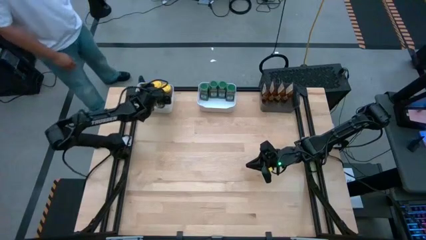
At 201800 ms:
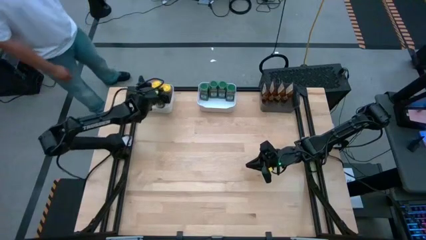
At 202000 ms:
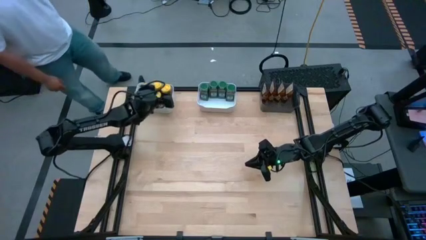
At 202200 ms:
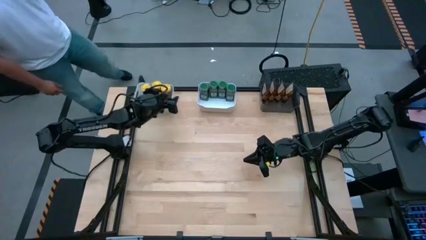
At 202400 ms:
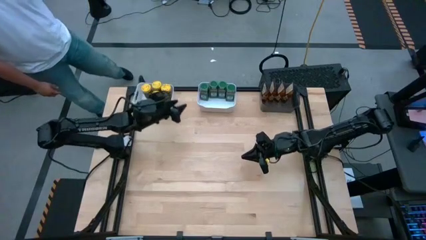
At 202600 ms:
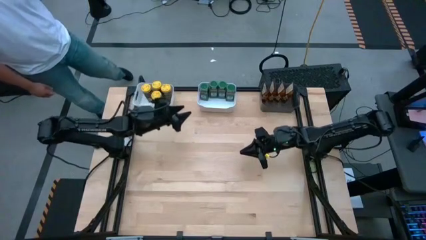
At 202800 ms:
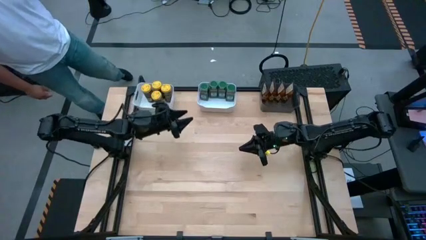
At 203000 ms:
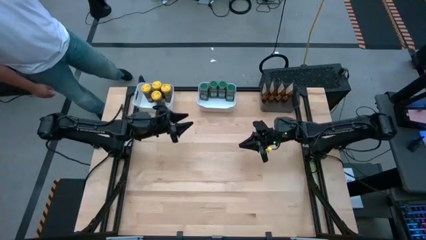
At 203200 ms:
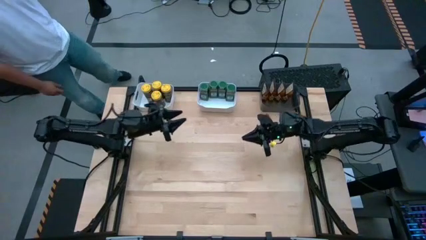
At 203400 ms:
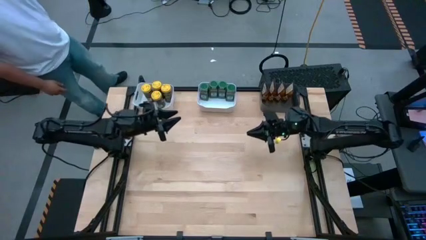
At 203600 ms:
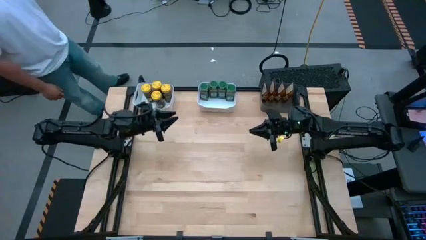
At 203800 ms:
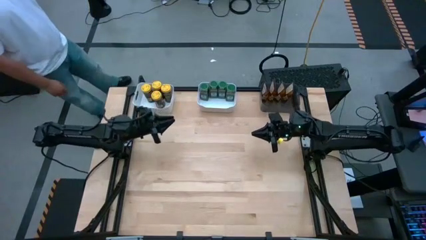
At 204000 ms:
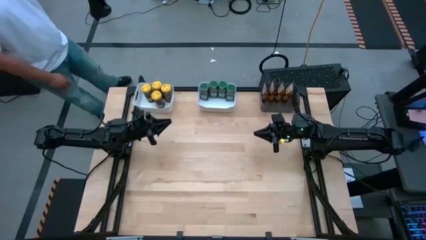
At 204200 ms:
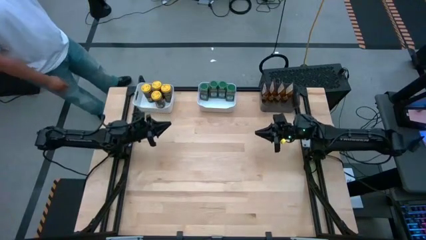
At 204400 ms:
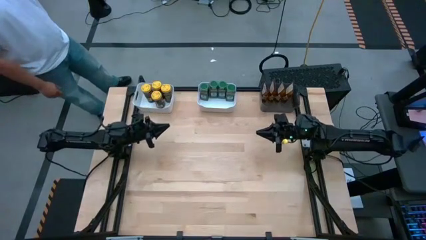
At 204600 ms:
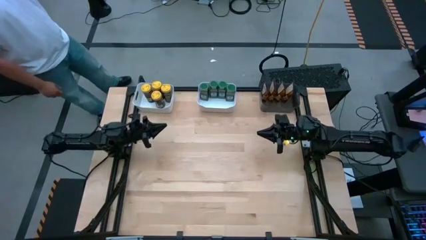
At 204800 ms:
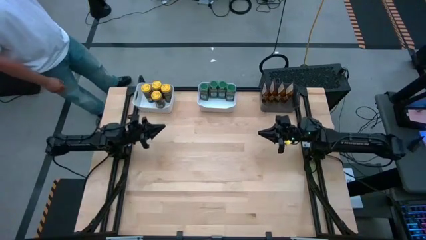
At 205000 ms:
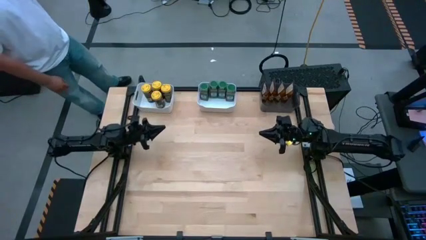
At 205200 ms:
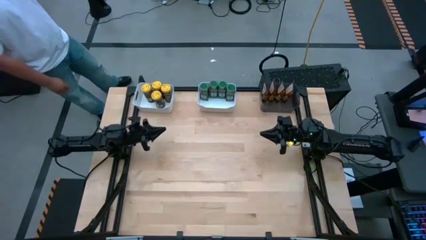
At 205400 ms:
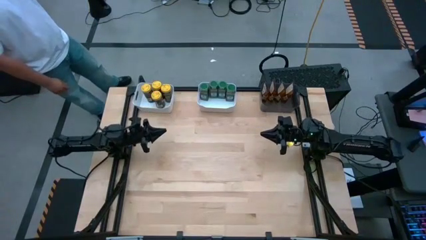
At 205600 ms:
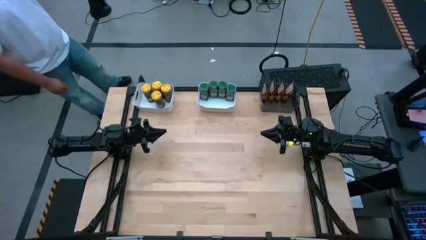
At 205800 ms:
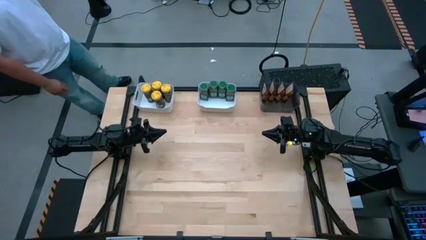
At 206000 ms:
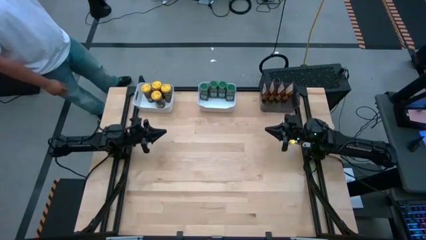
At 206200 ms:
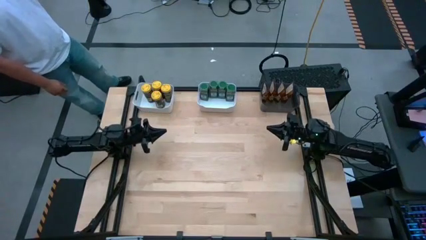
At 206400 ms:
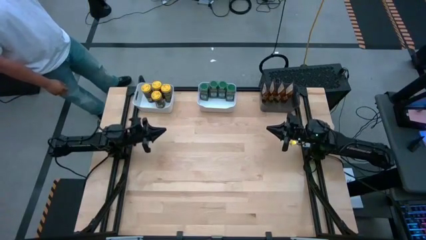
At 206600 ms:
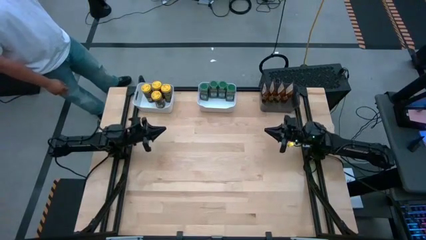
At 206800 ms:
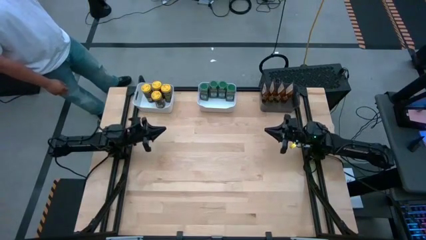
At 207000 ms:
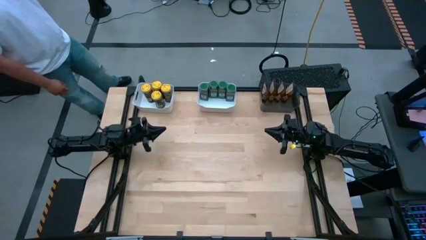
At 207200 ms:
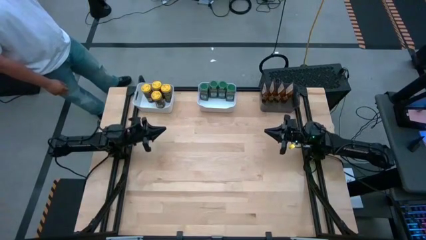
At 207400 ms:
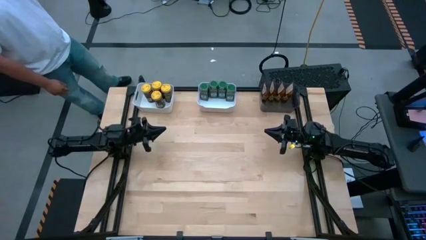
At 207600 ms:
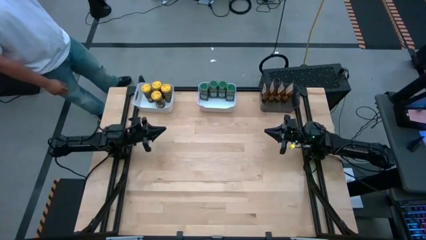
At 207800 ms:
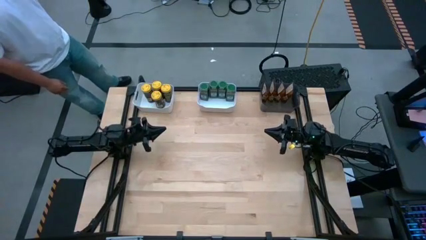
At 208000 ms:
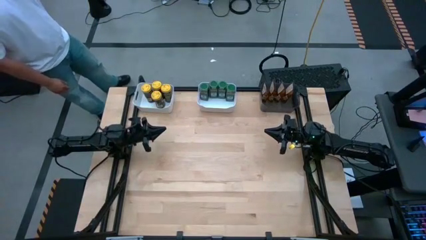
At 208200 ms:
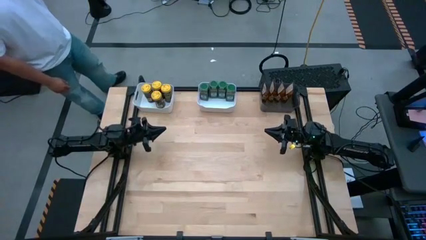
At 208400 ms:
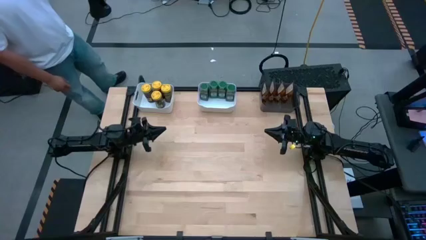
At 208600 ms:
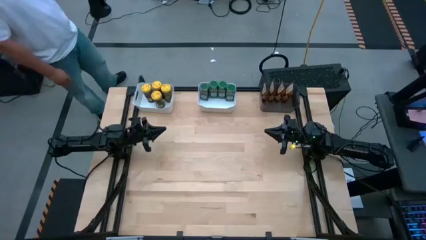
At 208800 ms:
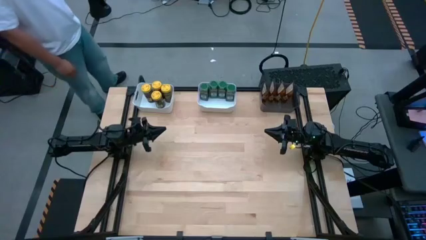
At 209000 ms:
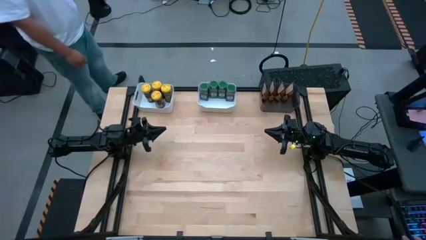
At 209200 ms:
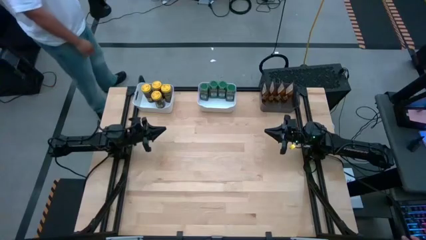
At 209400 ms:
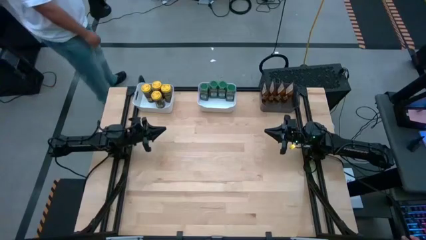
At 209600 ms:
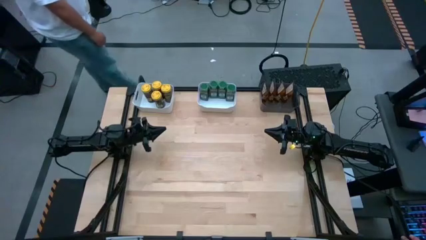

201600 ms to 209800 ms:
Task: Sort spices by type
Return to Home Position

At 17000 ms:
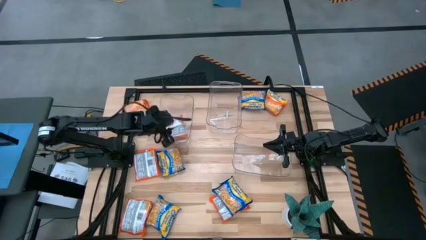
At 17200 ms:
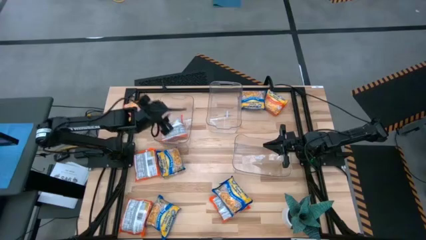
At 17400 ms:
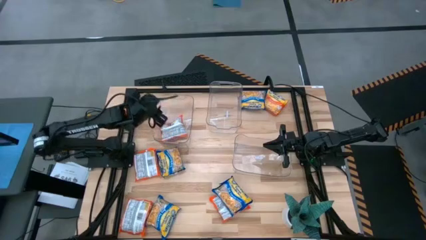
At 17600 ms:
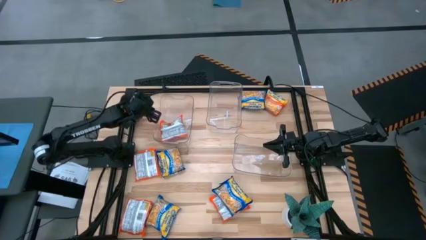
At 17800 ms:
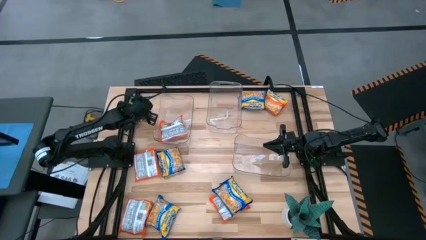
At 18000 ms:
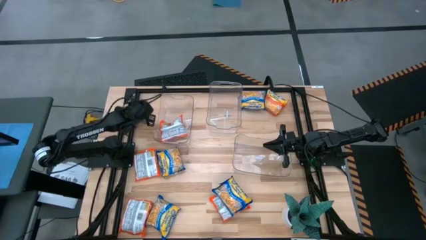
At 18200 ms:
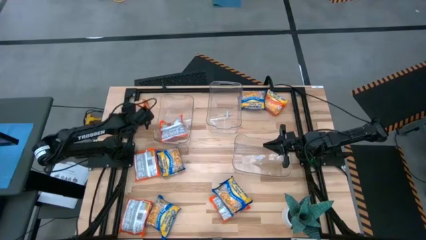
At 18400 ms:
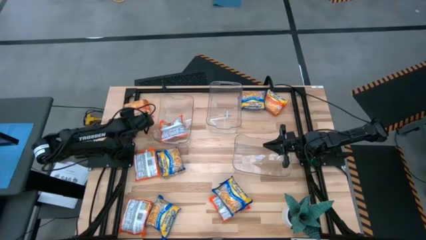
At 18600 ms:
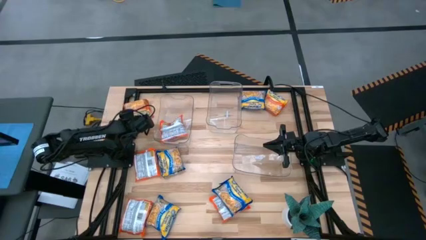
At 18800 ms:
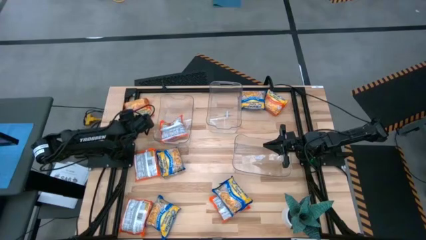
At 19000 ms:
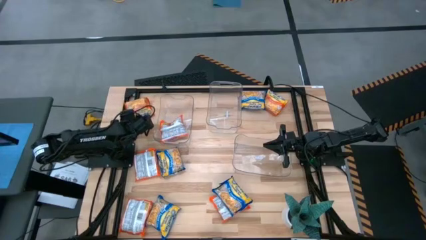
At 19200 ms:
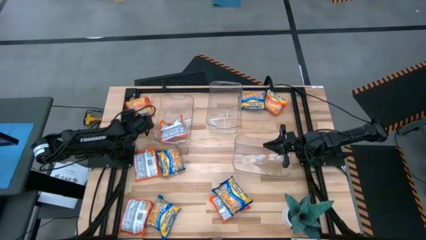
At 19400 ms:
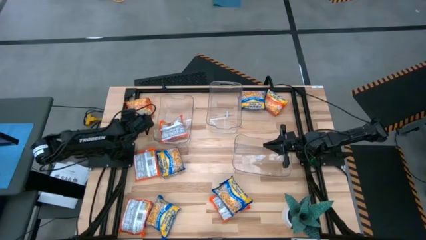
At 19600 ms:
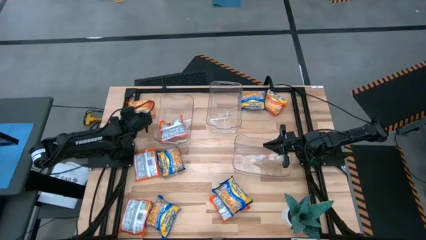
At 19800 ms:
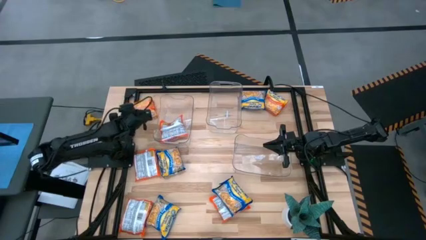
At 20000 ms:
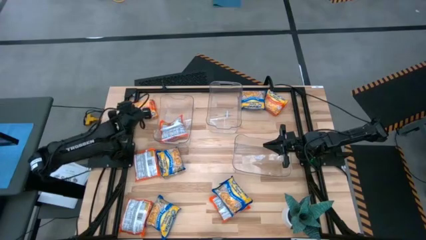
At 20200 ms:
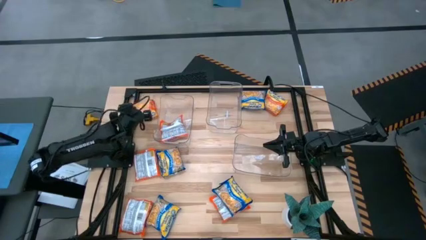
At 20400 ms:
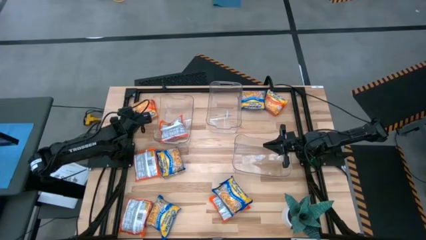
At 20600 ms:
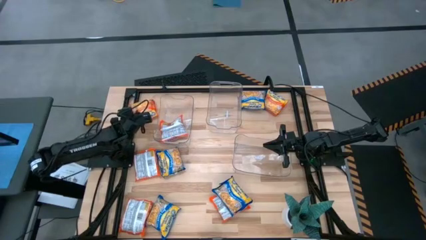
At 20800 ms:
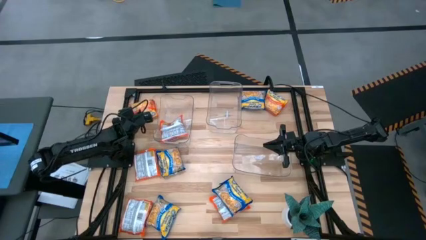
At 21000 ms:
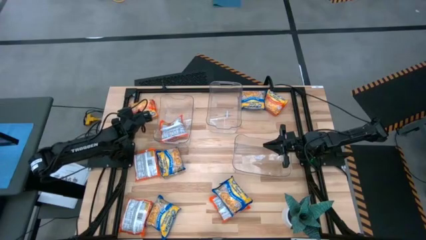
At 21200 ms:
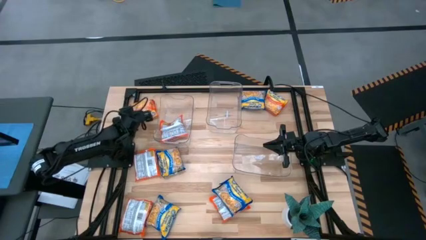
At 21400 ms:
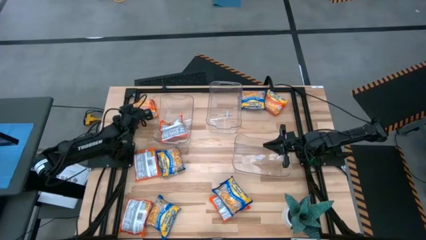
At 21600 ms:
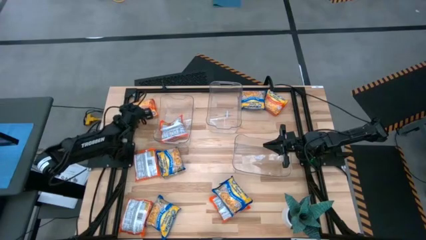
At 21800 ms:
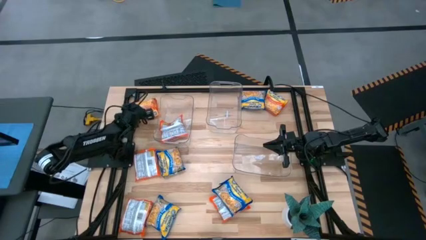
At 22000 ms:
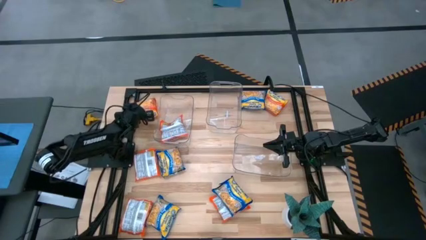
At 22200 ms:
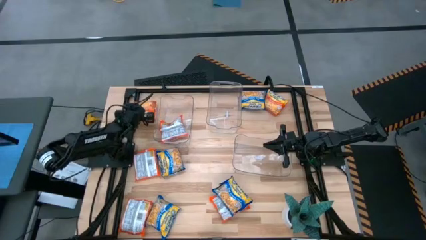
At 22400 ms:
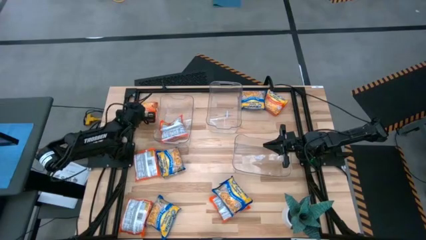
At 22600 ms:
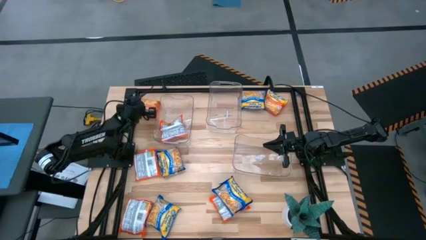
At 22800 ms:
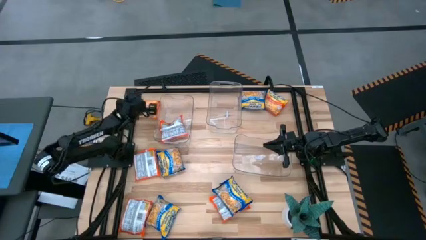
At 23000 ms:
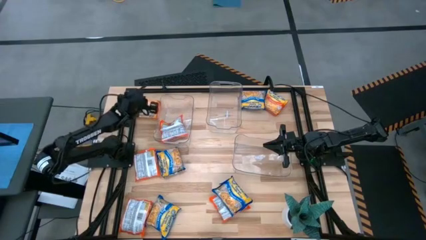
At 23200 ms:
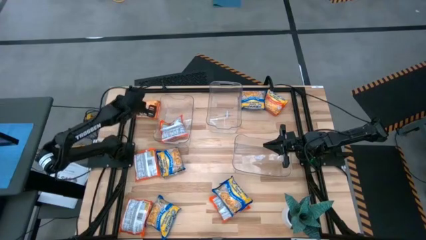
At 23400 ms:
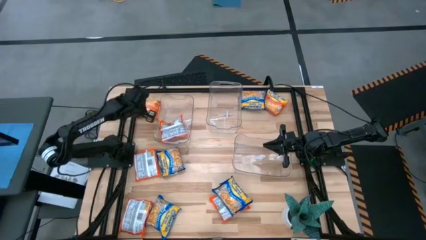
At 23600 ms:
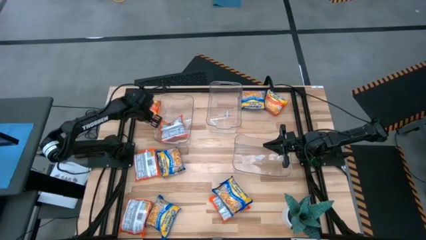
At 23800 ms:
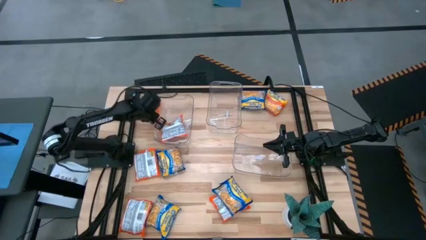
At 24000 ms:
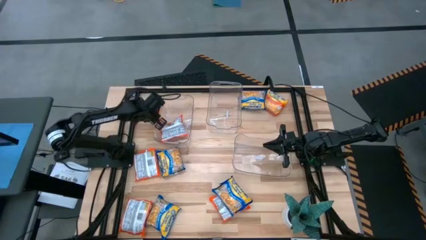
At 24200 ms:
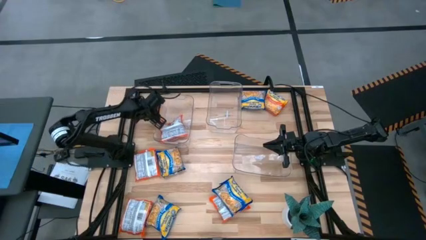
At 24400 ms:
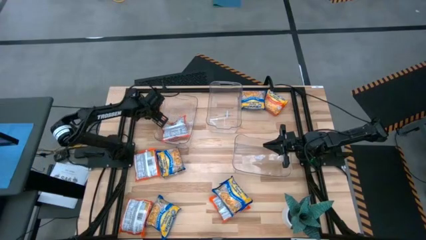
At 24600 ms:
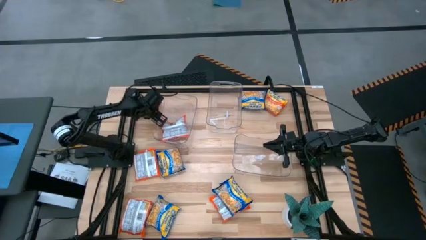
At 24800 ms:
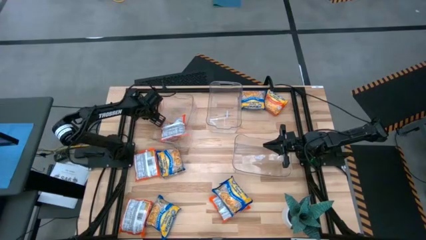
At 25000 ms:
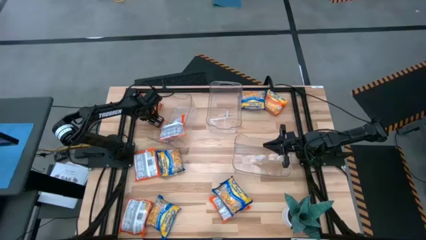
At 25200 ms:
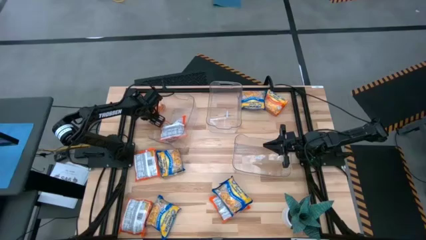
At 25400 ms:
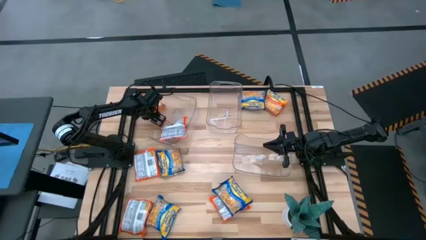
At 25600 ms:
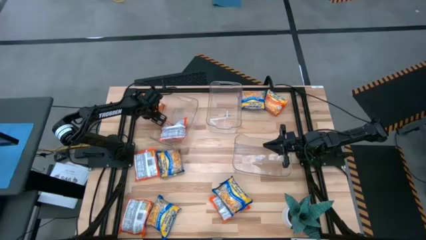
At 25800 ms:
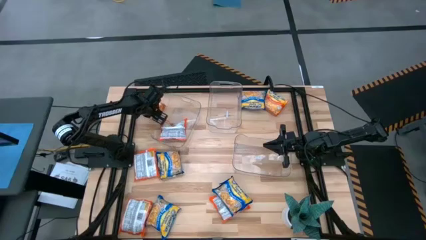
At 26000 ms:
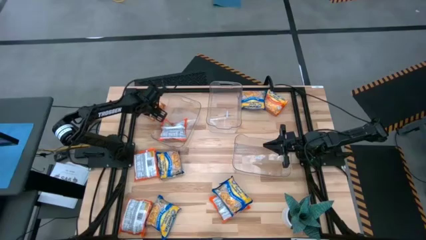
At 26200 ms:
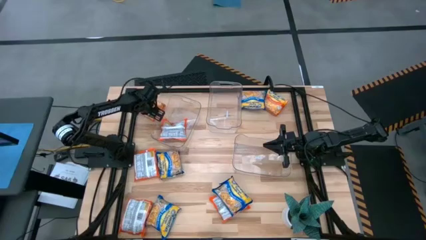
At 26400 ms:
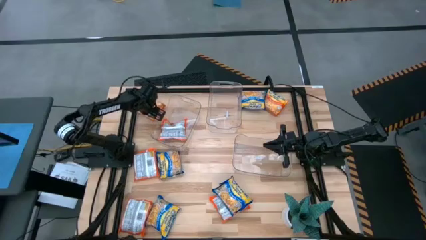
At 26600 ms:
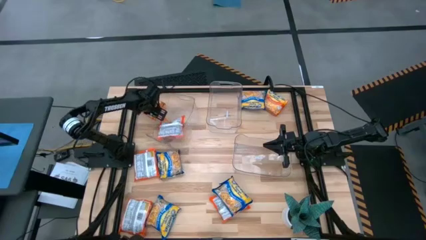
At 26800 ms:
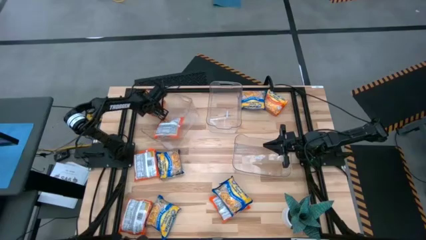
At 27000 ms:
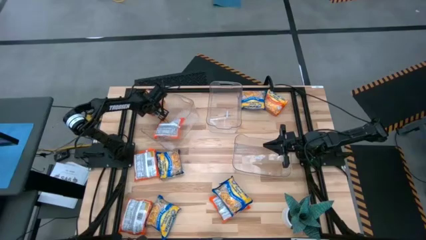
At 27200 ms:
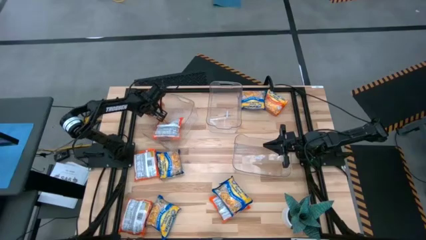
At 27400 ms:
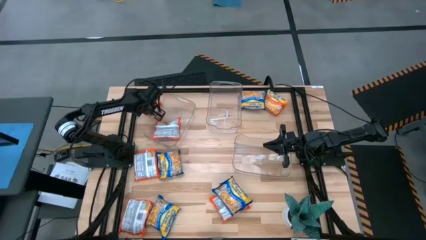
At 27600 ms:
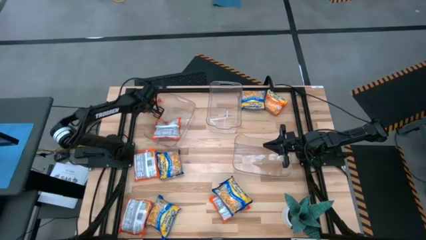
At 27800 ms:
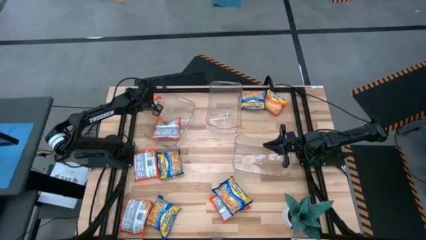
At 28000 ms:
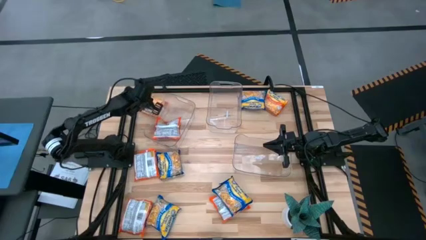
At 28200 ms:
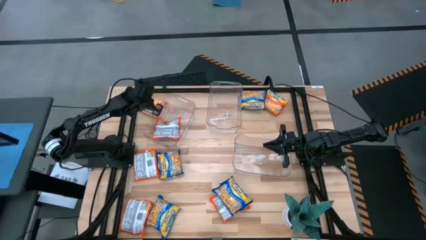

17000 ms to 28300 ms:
Task: Sort Maruchan noodles
Put the orange bag into the left transparent bin
